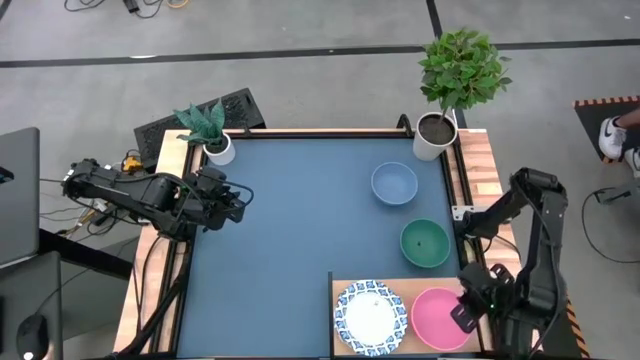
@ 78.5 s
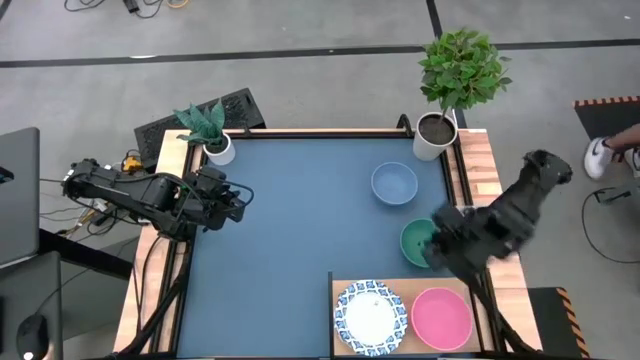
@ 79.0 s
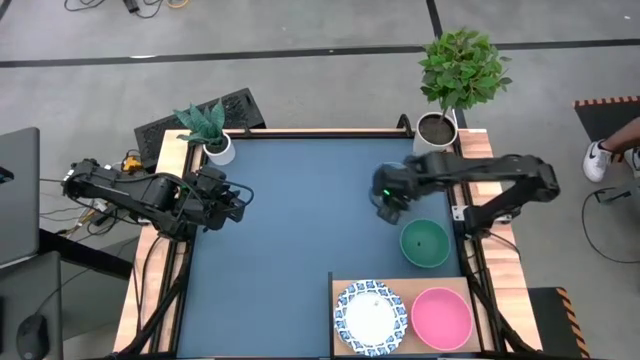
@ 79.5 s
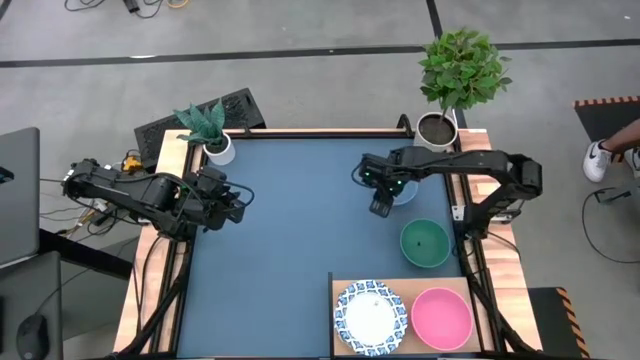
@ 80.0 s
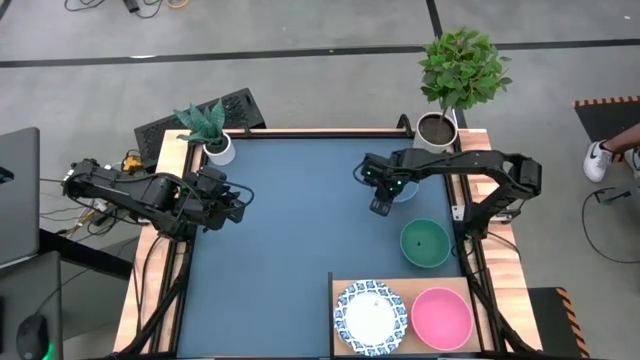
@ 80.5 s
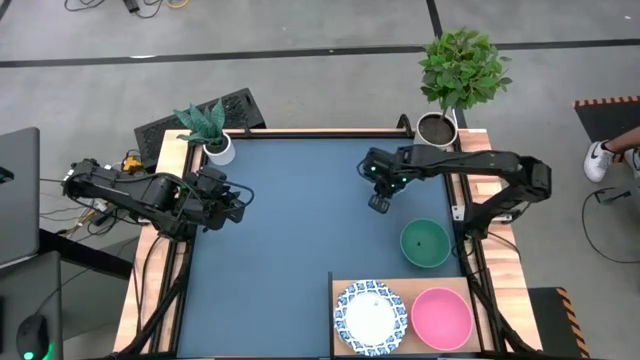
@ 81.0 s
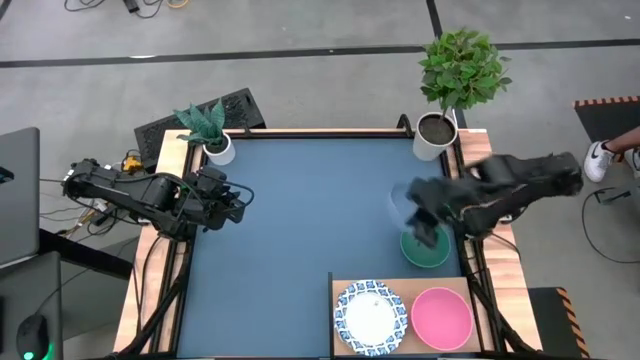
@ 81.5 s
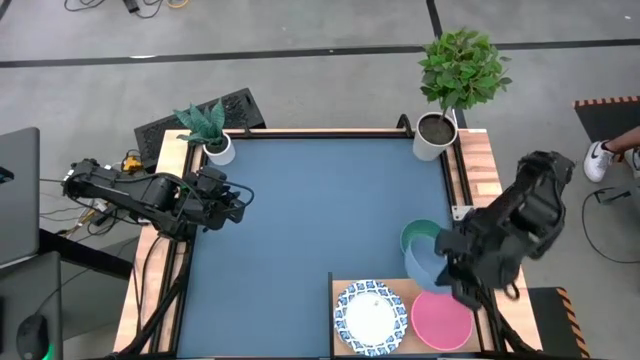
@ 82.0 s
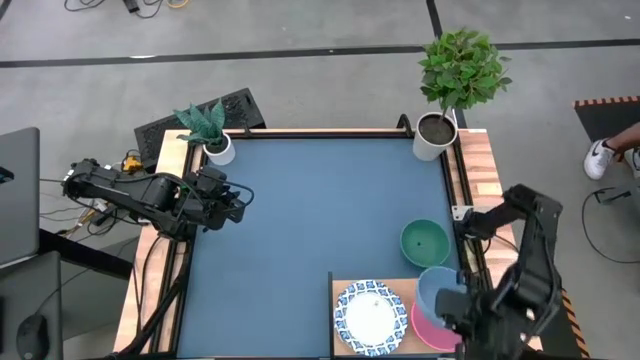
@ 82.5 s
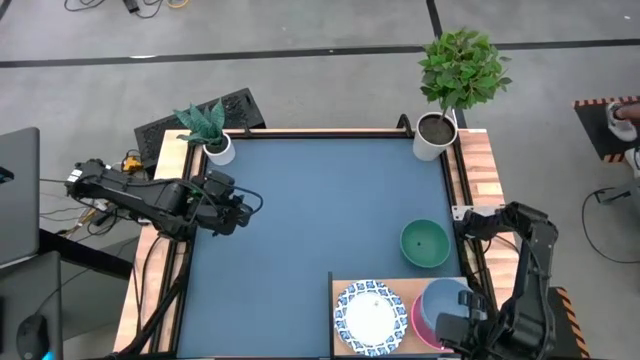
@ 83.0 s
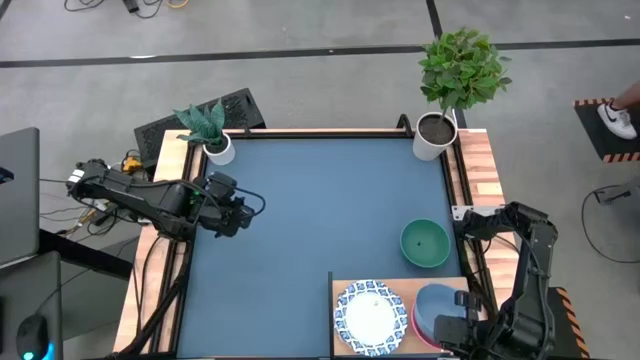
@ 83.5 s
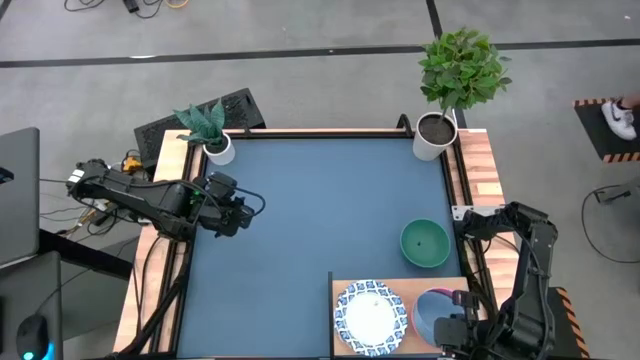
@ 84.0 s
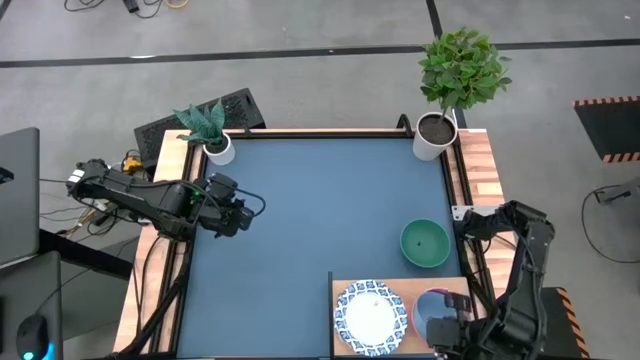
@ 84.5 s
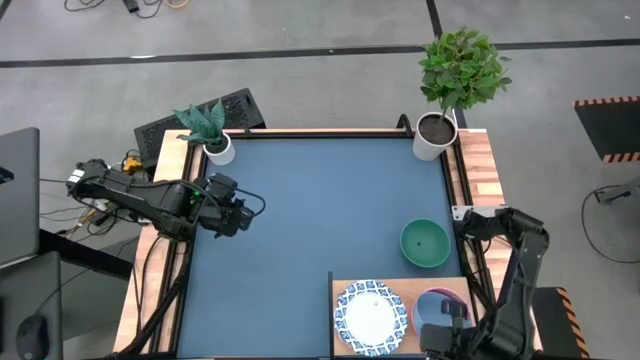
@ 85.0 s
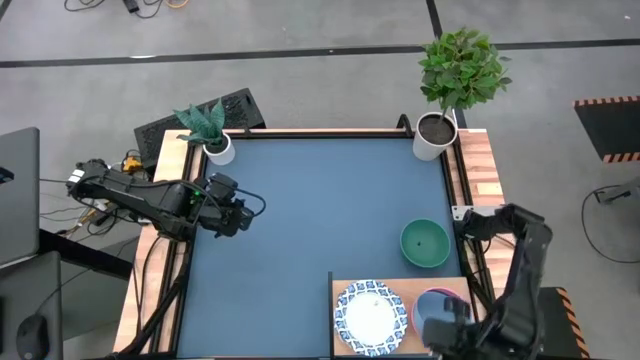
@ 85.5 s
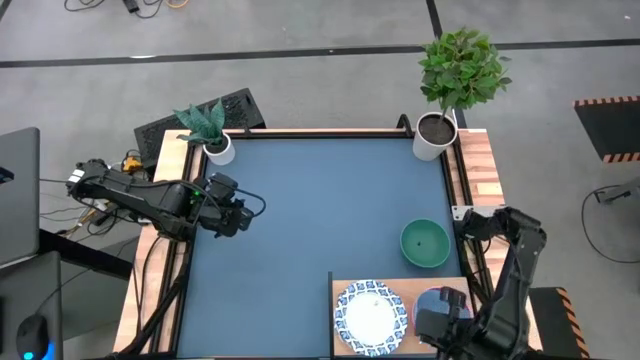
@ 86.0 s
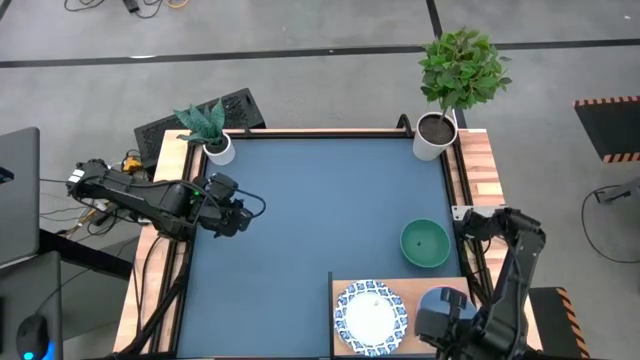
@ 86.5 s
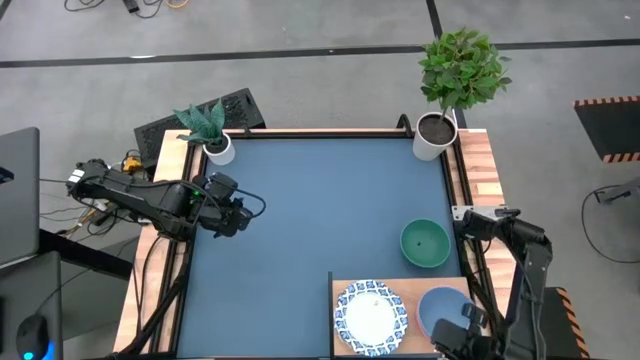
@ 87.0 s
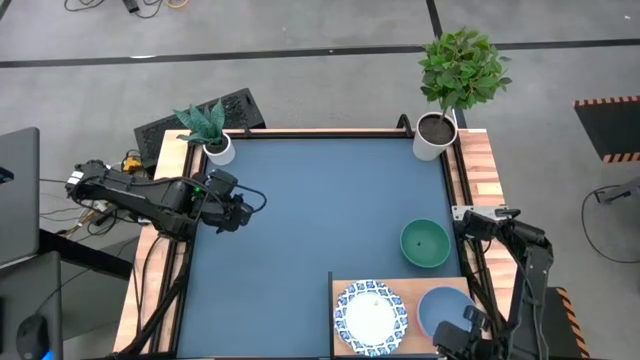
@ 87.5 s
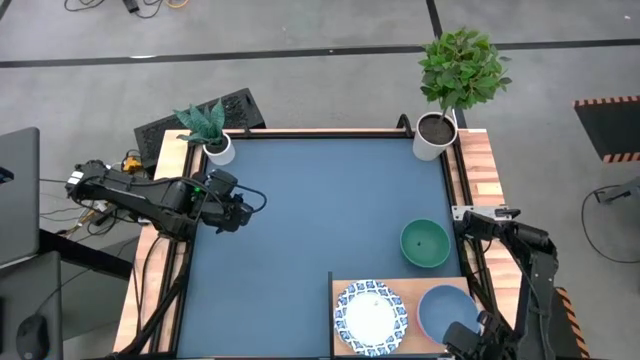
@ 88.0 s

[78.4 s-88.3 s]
Task: Place and stack bowls onto a shelf
Stack the blue bowl on the pink bowl on the shelf

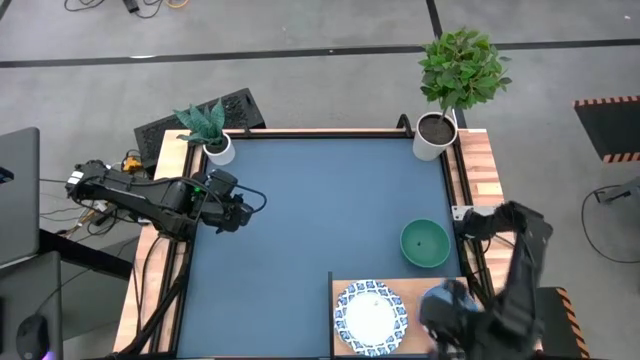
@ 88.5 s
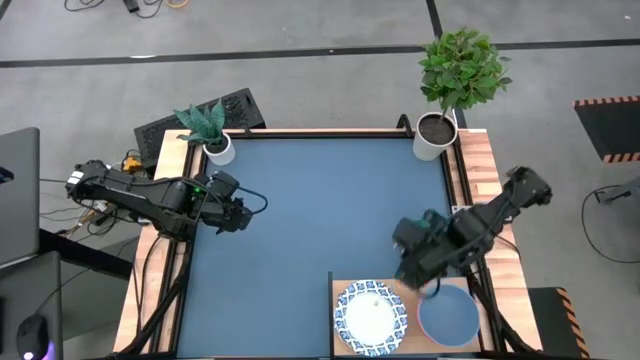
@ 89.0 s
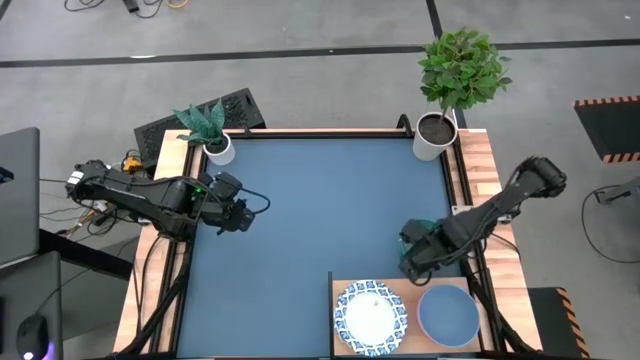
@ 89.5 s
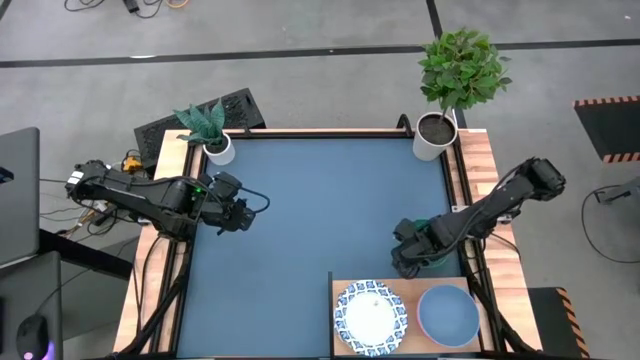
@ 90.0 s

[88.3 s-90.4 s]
Stack the green bowl on the blue bowl on the shelf

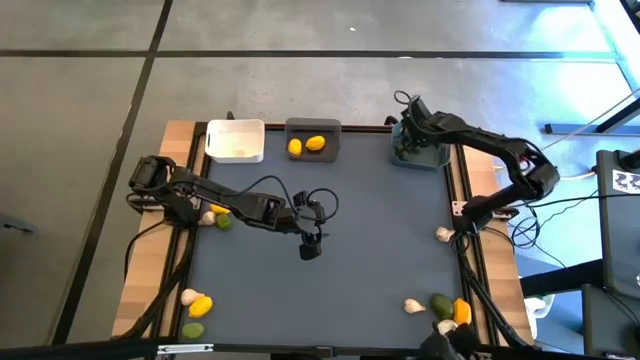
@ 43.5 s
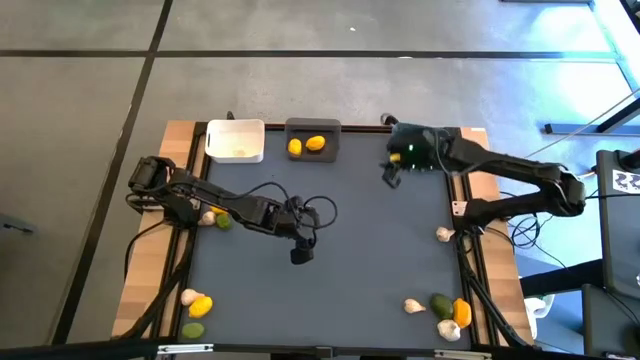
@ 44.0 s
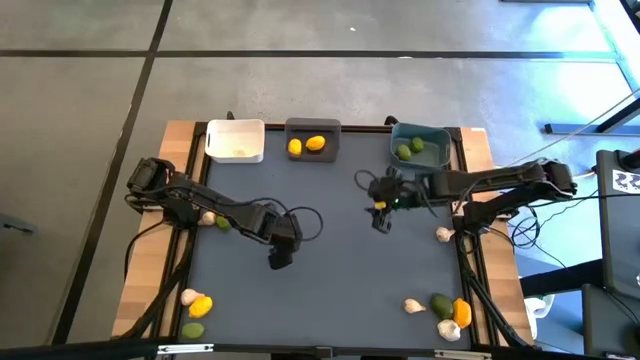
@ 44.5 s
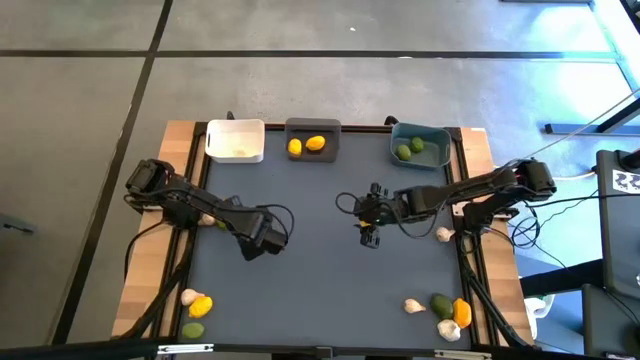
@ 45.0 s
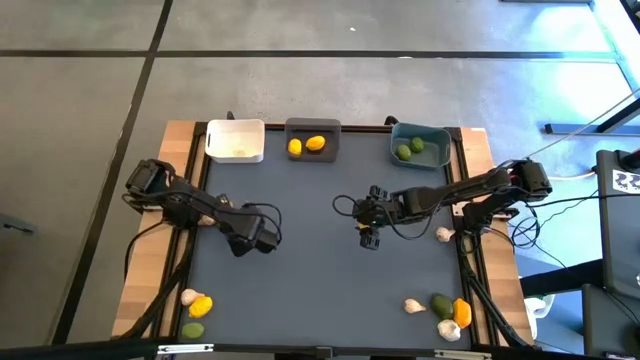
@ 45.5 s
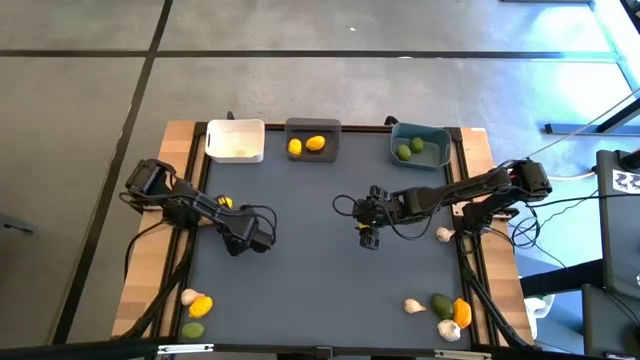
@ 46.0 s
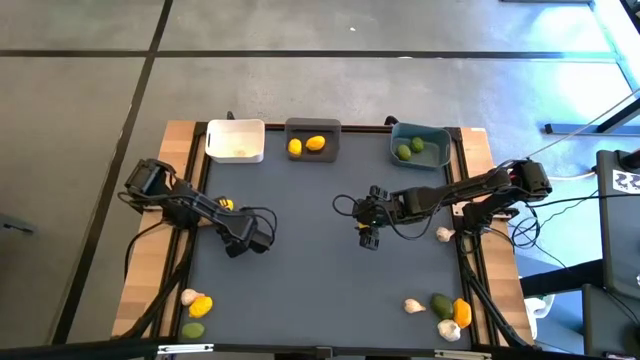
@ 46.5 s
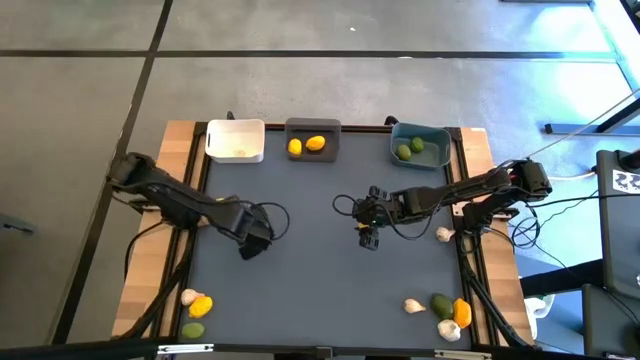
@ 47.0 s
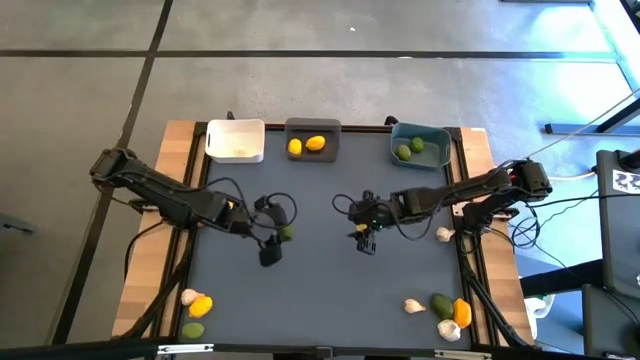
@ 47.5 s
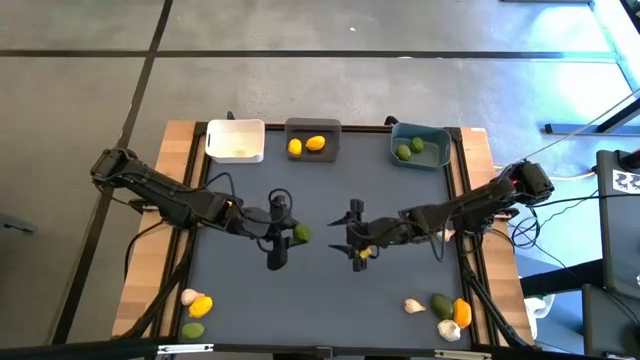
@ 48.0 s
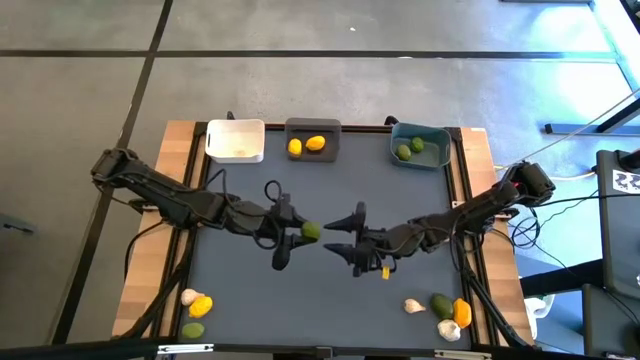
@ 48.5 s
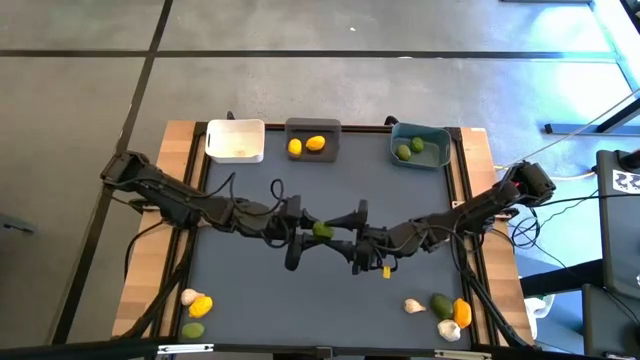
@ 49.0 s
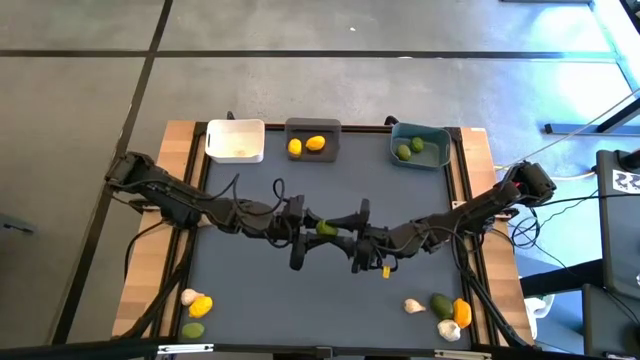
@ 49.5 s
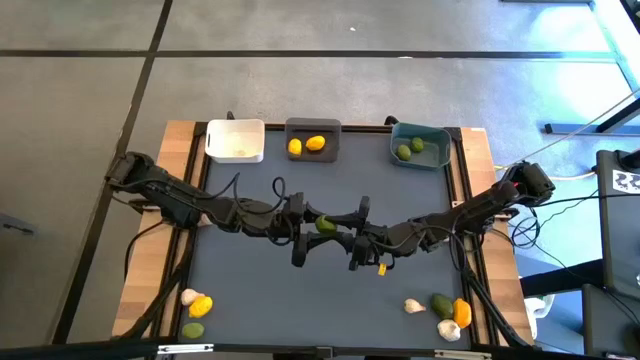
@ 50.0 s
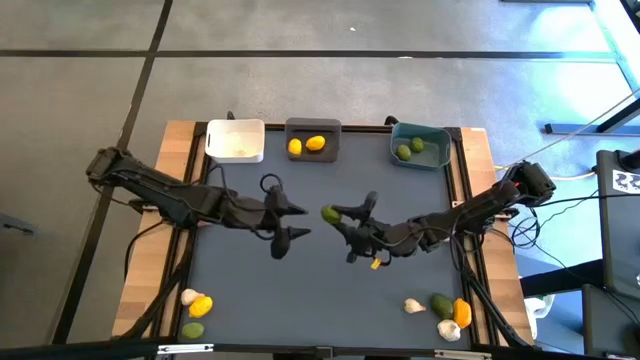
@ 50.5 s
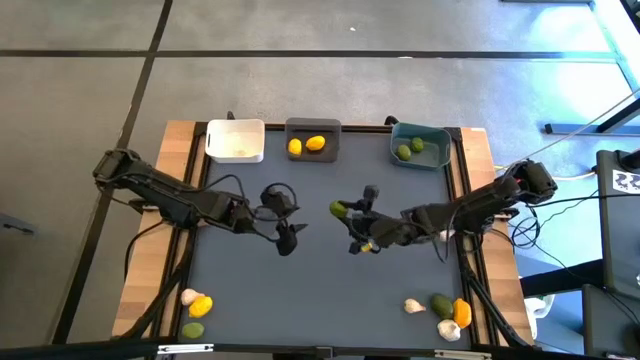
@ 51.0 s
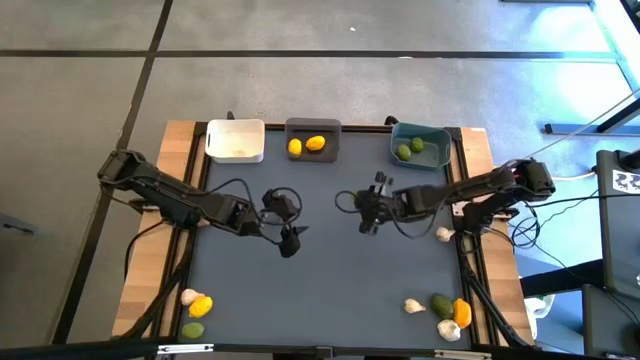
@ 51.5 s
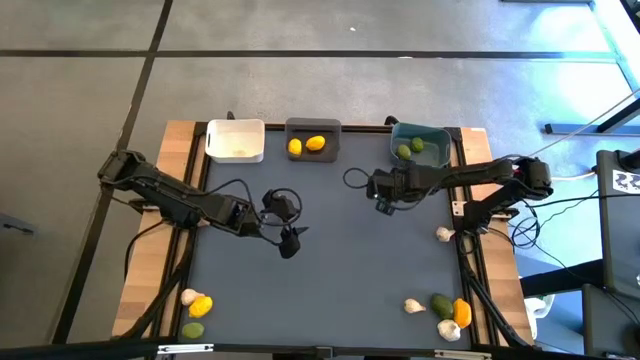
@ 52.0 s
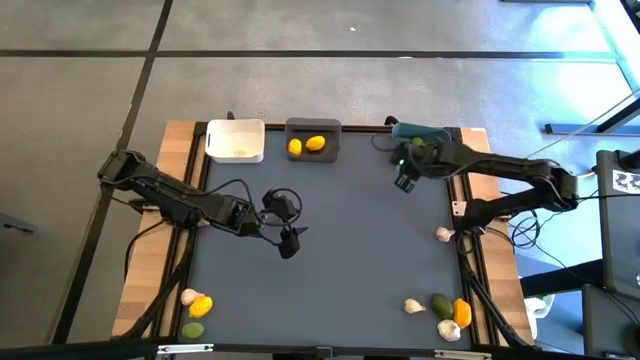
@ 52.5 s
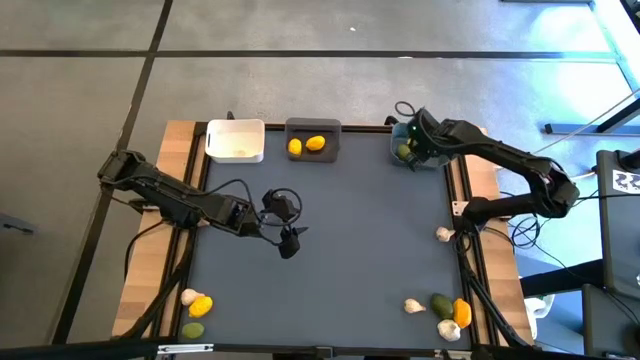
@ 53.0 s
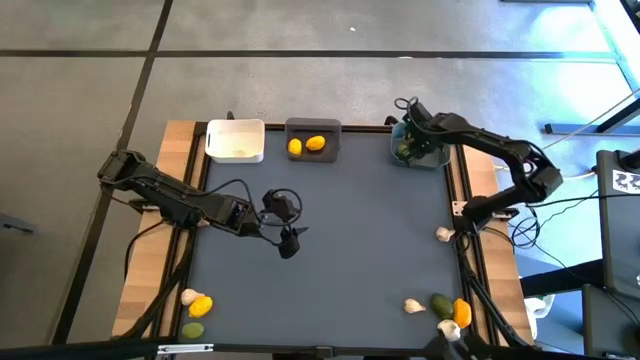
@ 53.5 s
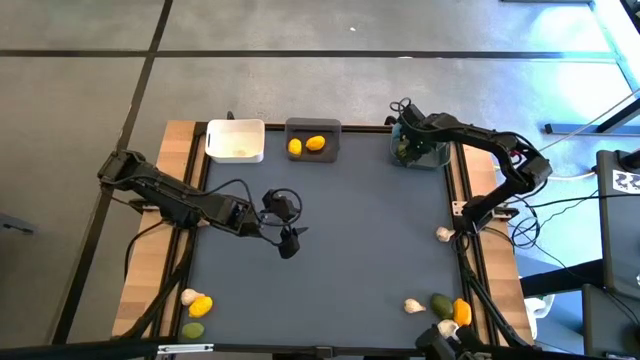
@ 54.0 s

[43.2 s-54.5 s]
Task: Sort produce into baskets
Put the lime into the blue bin
